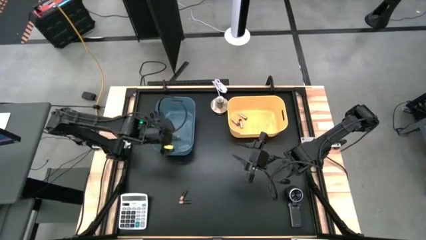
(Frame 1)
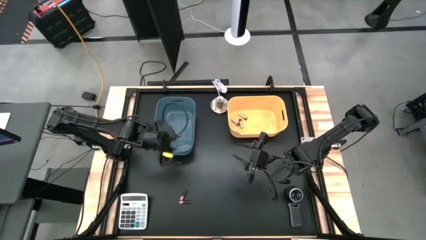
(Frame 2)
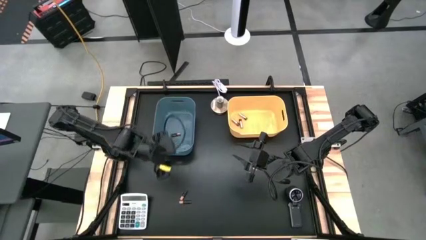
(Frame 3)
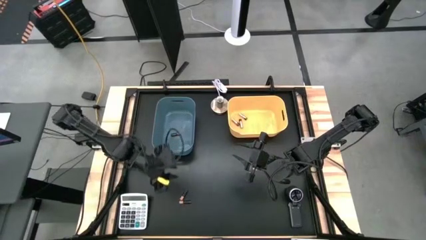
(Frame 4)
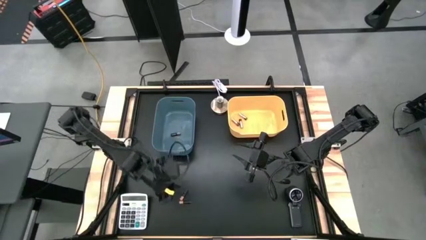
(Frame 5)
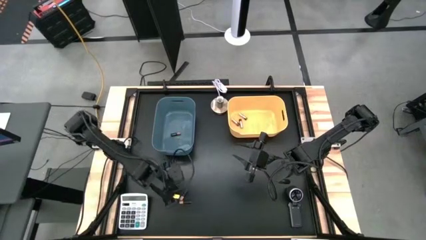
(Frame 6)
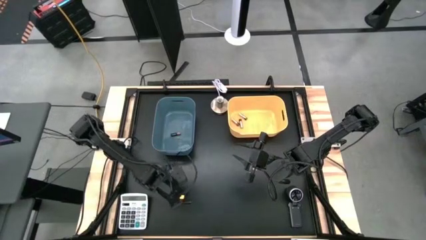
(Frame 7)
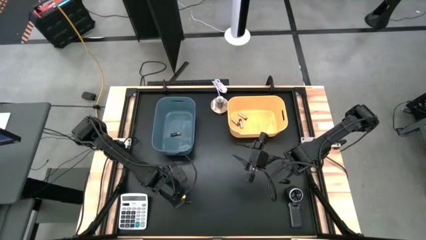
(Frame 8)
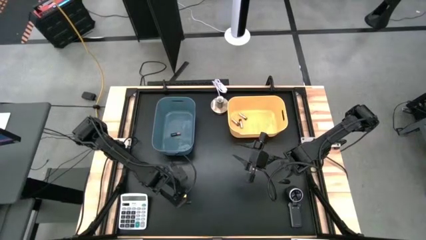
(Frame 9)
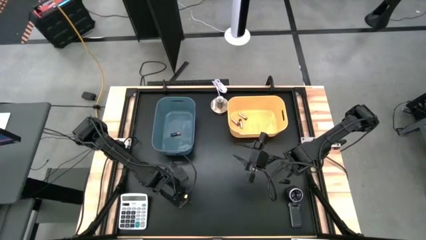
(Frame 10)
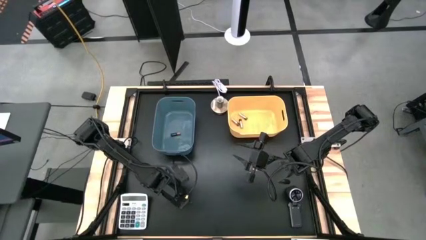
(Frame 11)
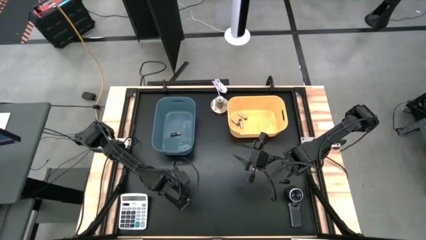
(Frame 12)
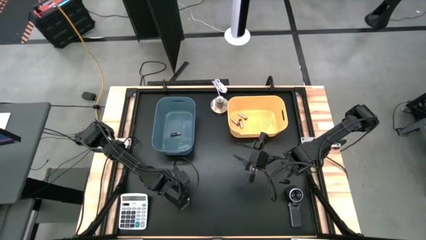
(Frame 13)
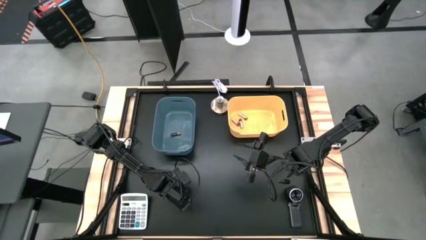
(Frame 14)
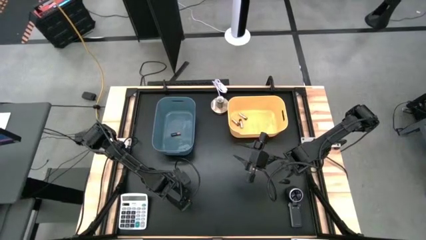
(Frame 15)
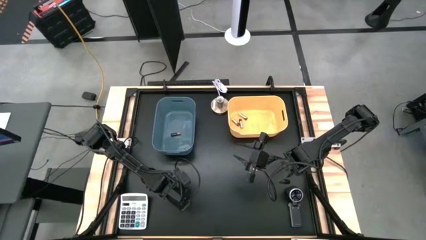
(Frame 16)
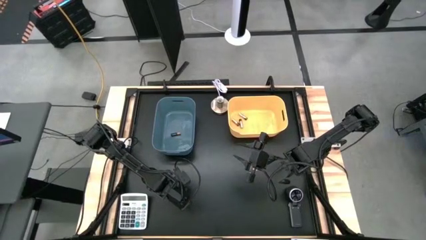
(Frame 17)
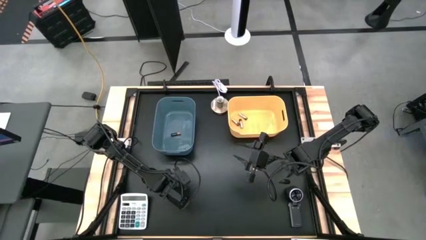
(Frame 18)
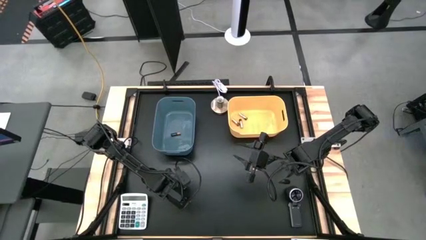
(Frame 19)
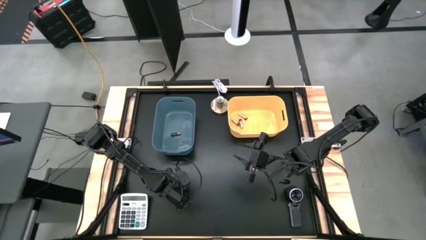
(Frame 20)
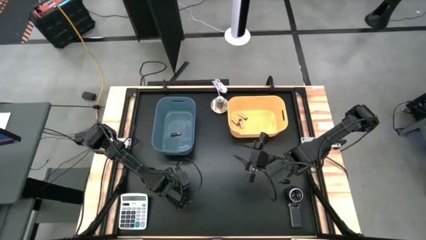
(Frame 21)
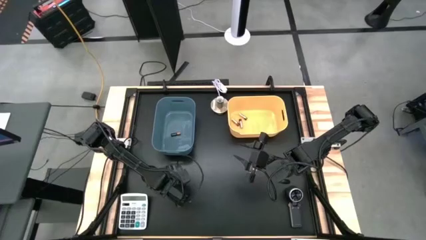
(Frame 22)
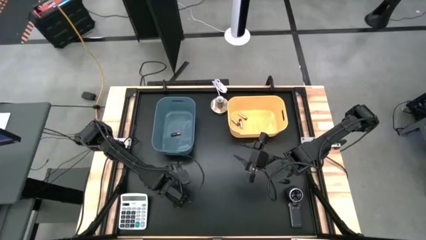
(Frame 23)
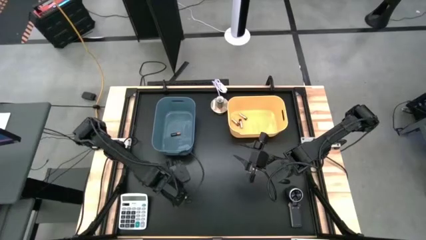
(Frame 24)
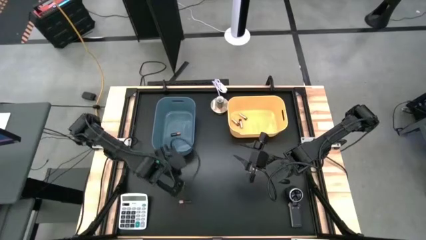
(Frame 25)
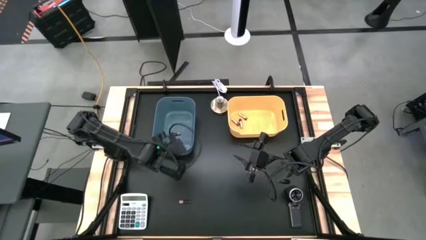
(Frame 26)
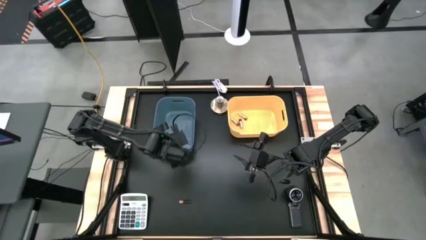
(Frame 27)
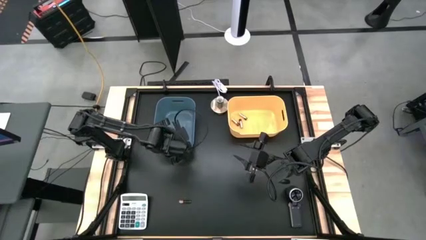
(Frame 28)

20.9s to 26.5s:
Task: Sort batteries
Put the top black battery into the blue bin

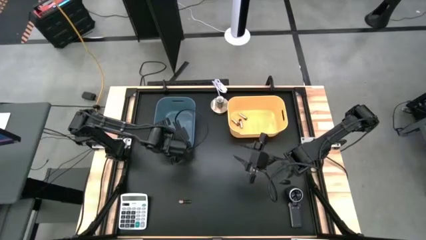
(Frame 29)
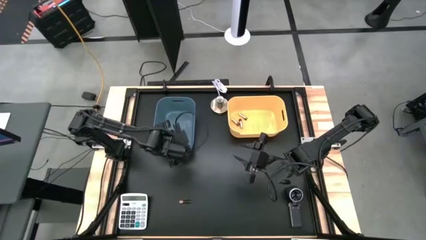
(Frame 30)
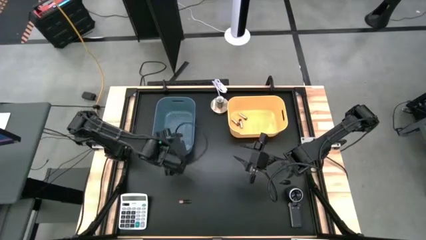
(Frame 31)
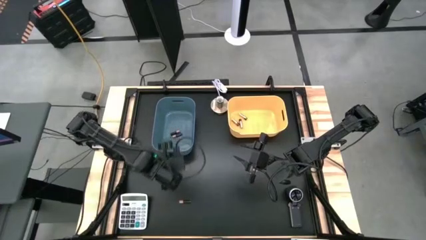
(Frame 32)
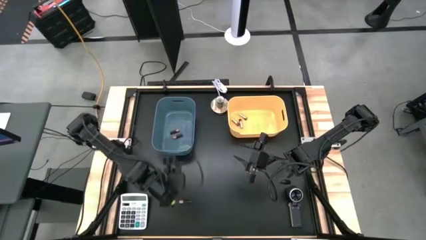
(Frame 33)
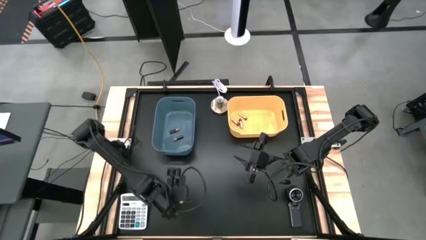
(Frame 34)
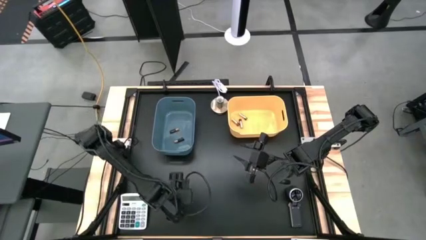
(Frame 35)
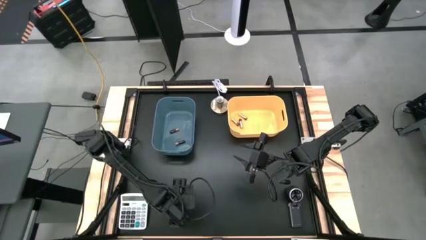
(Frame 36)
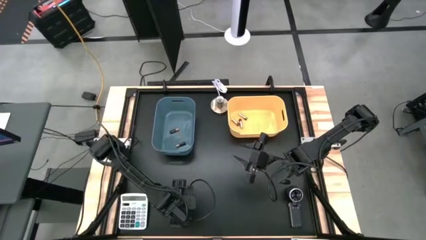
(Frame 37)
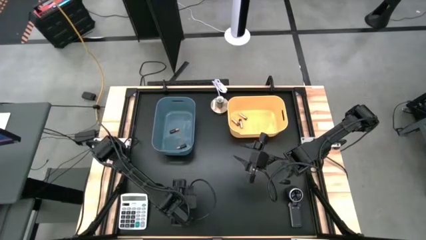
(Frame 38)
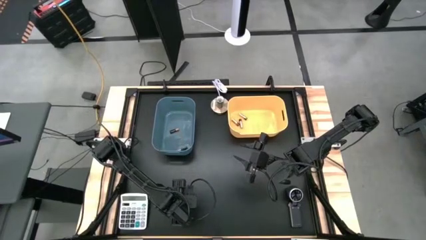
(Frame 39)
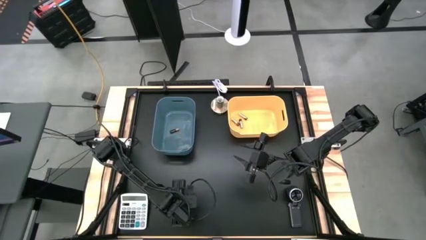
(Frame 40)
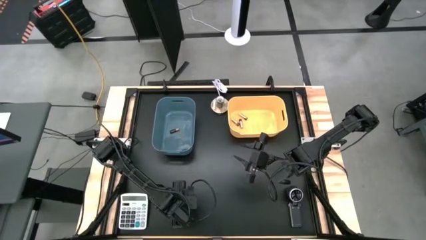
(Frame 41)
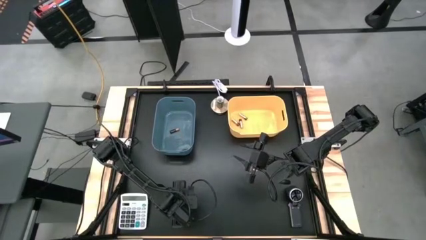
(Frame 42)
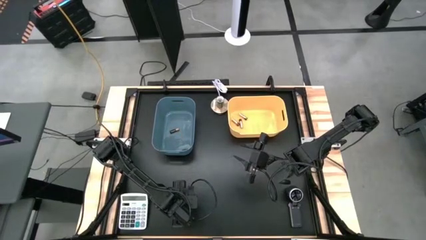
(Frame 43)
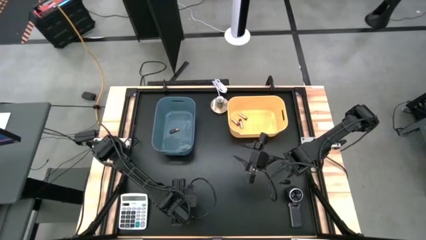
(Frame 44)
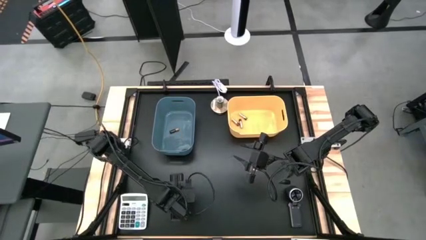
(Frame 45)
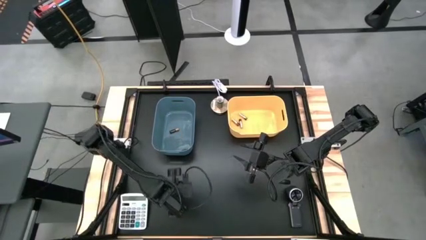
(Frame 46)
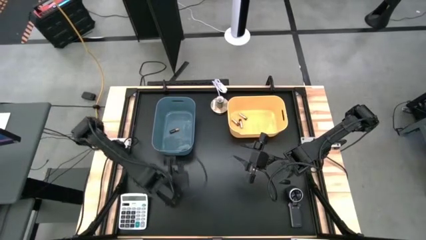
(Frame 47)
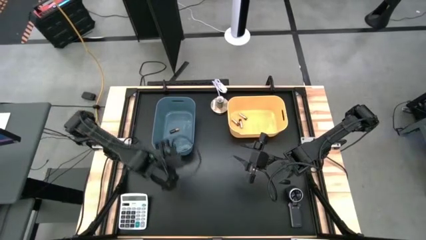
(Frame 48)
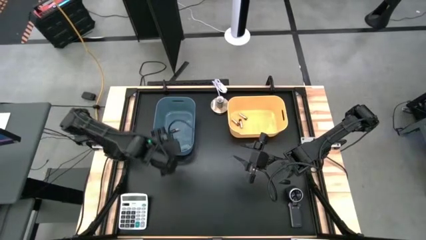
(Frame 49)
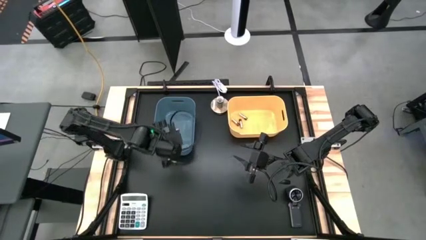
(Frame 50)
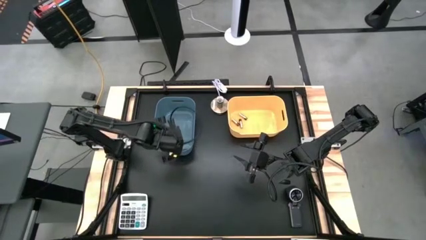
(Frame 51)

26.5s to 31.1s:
Put the black battery into the blue bin

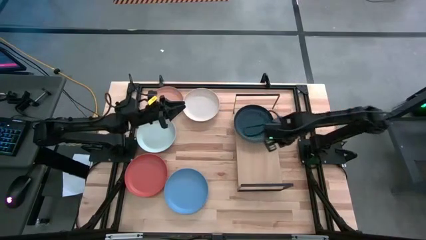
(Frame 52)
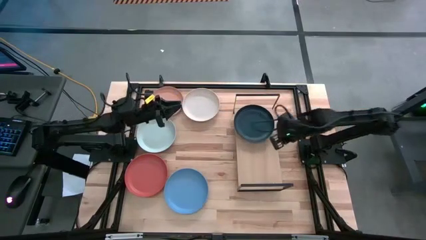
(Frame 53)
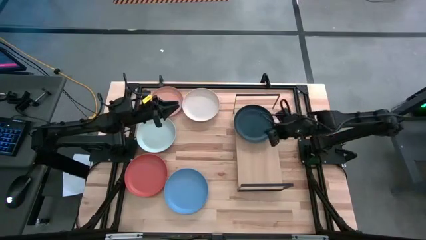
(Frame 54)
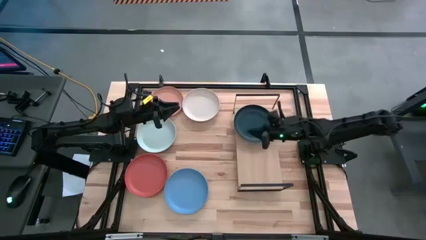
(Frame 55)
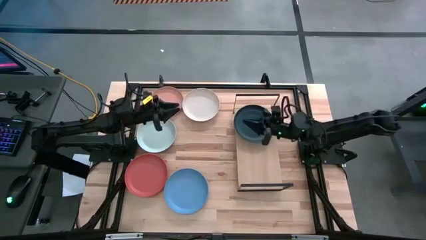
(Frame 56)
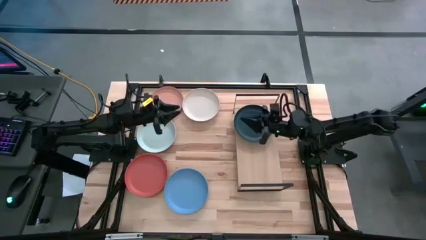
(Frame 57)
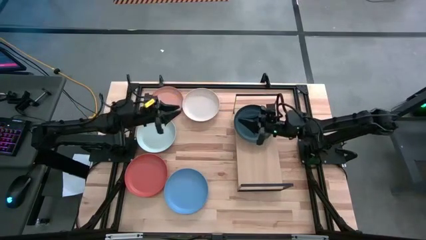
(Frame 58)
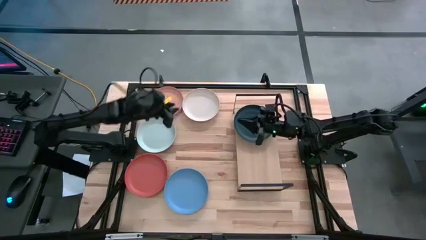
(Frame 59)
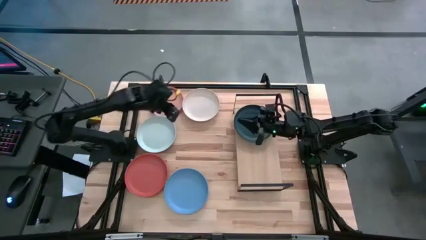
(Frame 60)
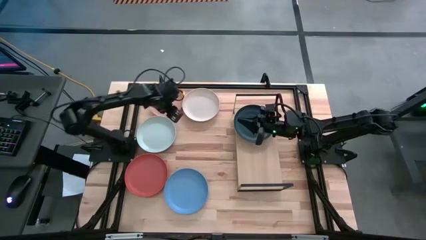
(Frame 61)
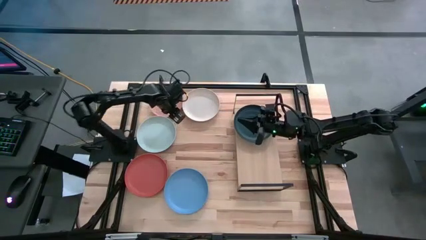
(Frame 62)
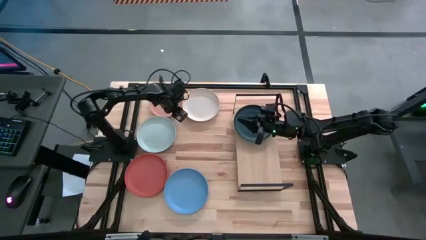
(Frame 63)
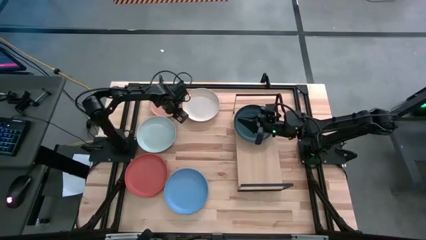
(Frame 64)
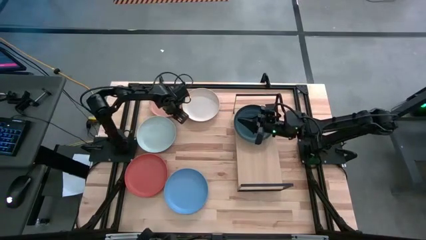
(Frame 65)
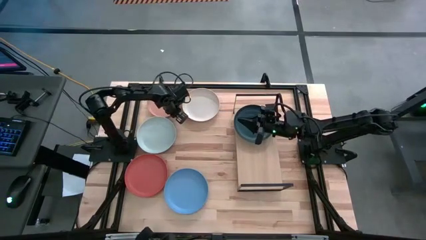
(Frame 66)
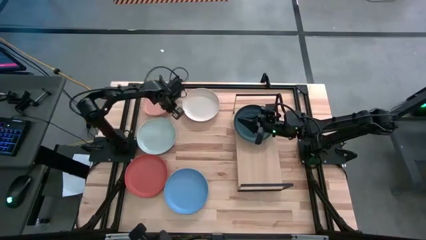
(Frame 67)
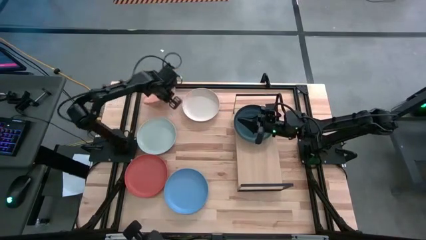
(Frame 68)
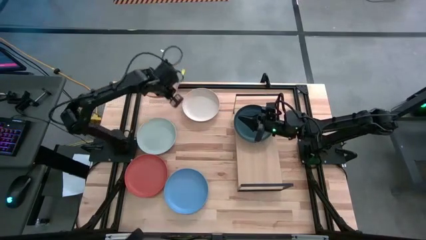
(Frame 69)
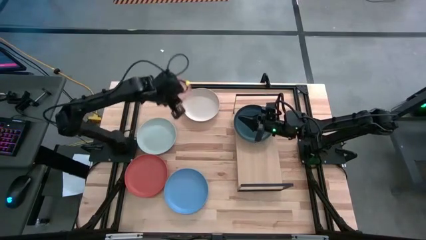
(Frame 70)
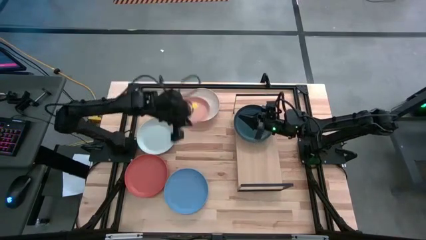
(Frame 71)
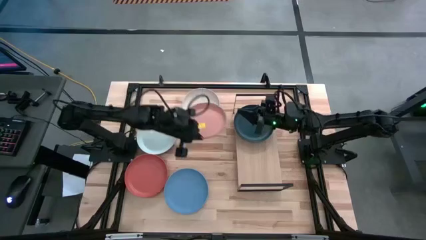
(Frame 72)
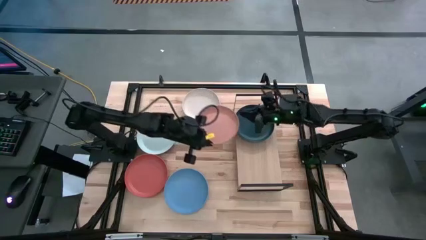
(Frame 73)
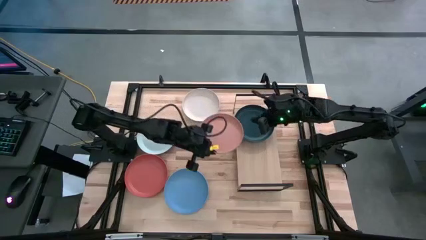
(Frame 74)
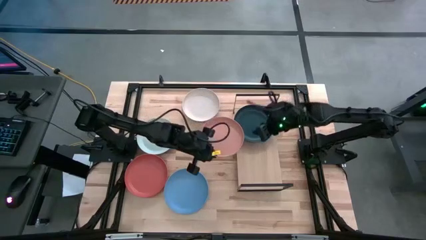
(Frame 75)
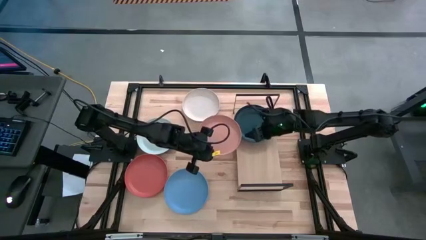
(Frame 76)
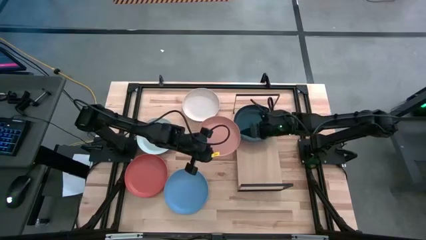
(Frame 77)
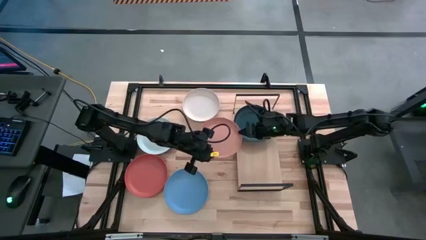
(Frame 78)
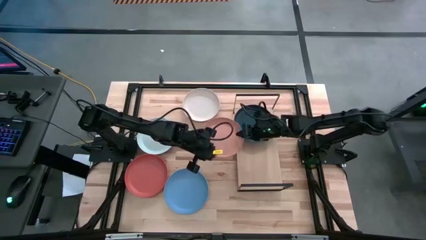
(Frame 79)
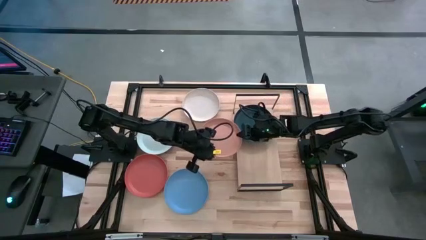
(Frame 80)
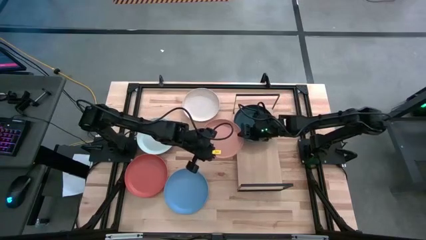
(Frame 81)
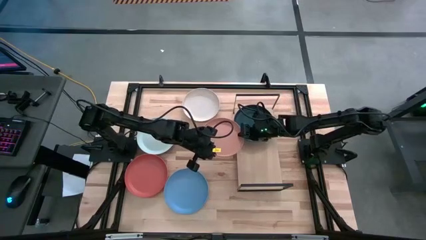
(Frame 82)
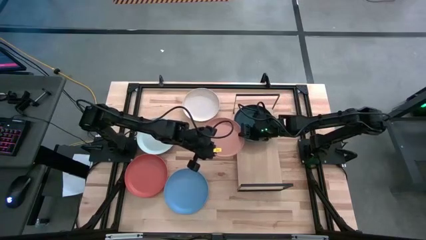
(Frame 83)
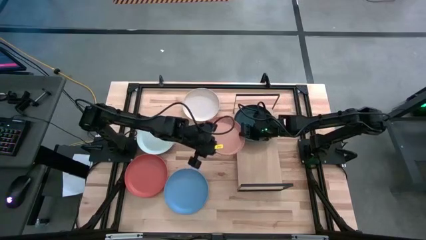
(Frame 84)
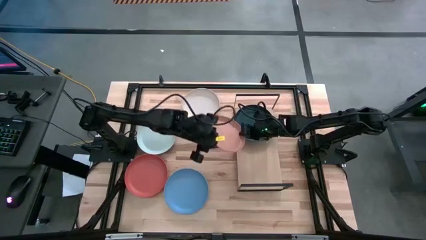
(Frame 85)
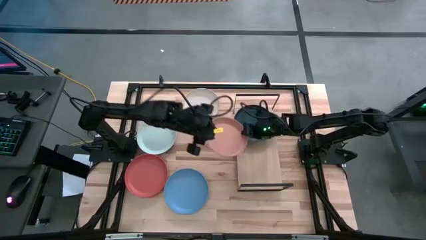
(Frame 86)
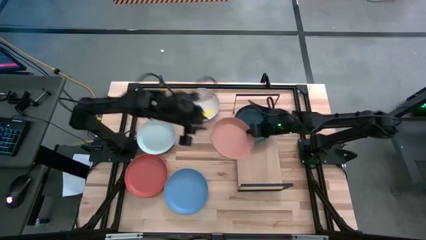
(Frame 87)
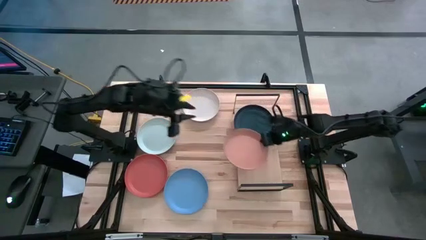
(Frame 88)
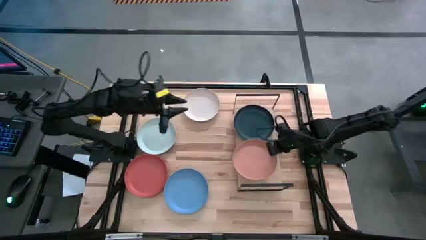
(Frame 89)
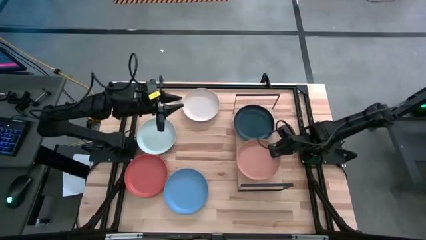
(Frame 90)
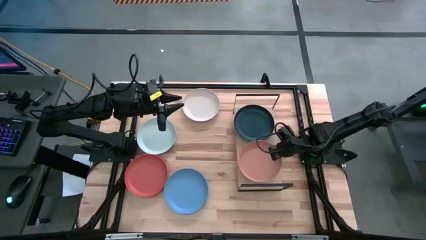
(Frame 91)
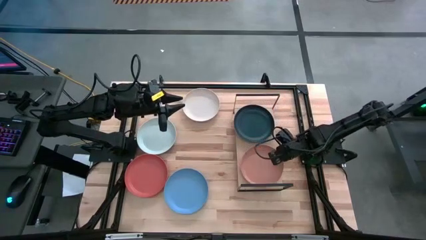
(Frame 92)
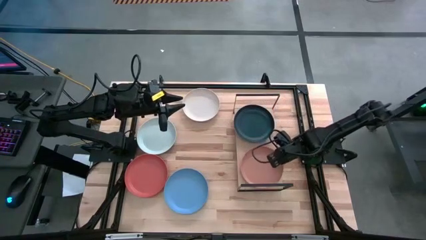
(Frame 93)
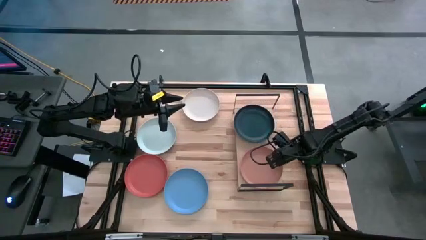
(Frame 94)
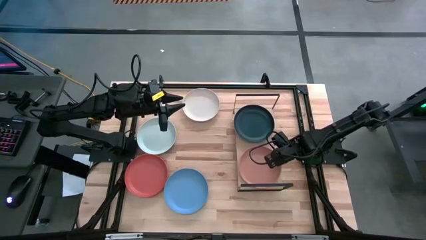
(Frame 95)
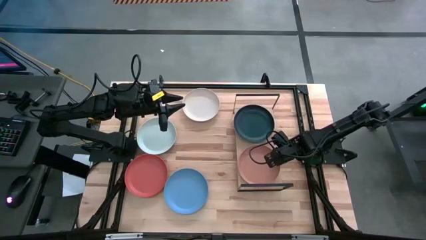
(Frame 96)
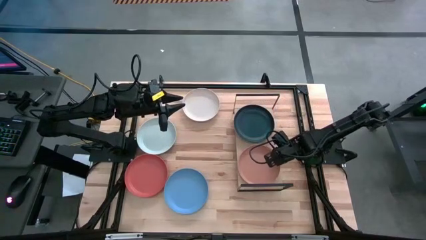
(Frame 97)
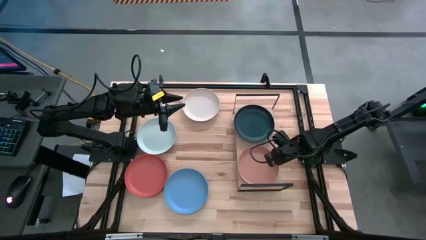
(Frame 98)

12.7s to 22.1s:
Task: Place and stack plates onto a shelf
Put the brown plate on the shelf
